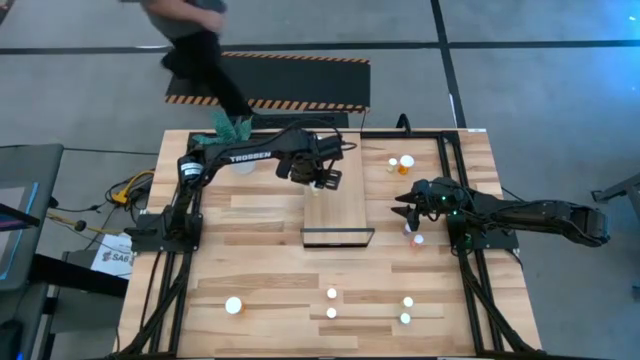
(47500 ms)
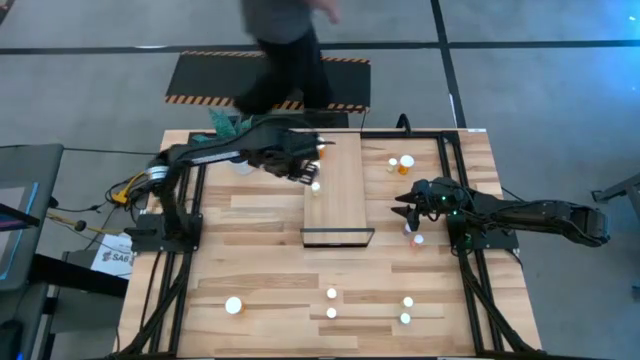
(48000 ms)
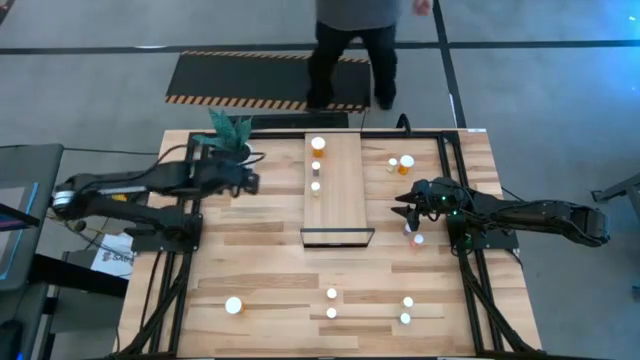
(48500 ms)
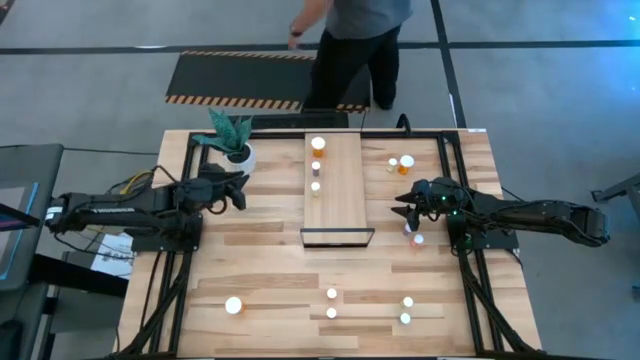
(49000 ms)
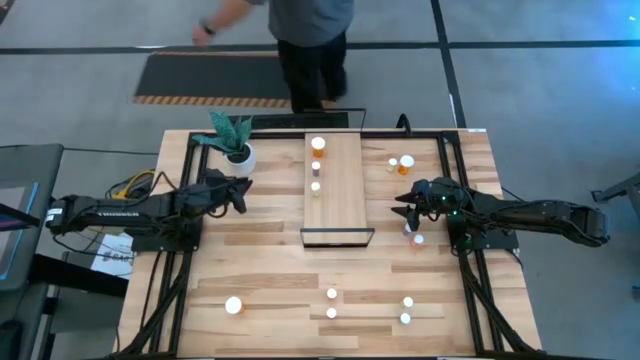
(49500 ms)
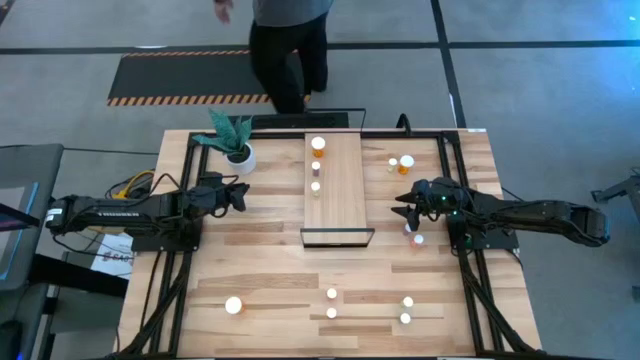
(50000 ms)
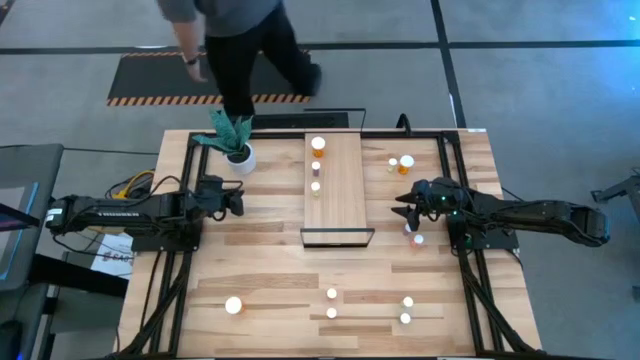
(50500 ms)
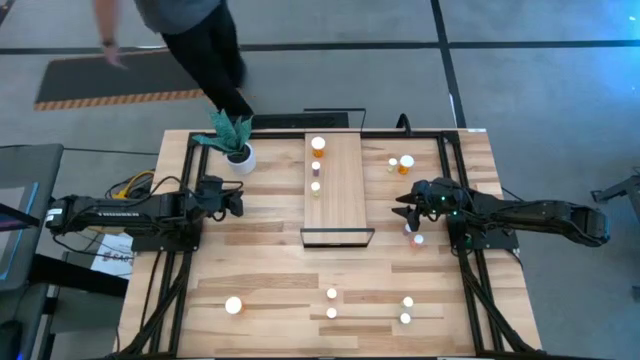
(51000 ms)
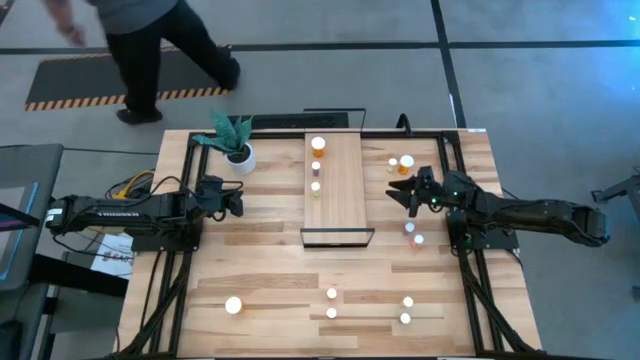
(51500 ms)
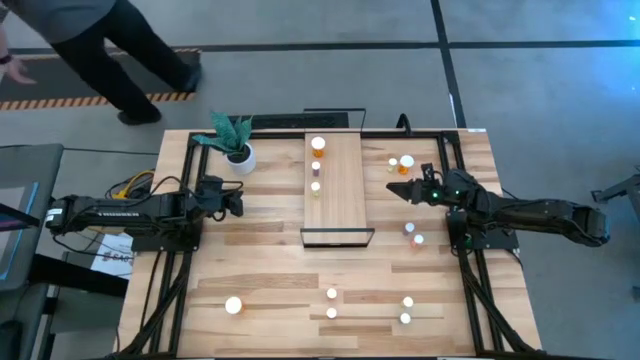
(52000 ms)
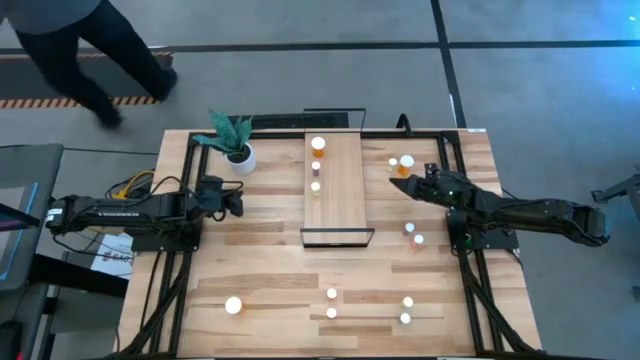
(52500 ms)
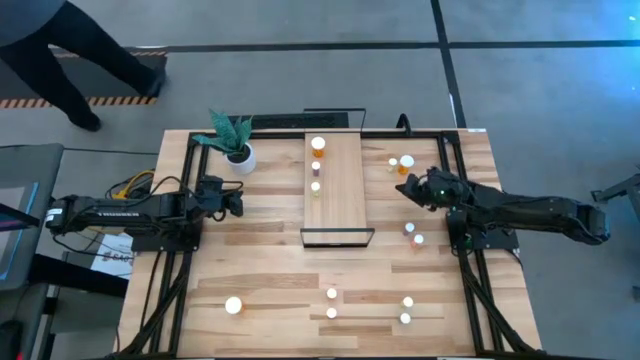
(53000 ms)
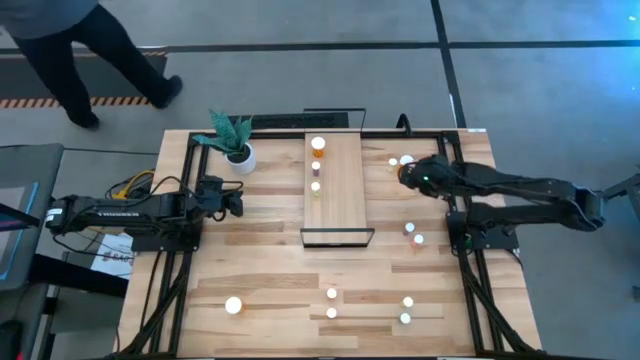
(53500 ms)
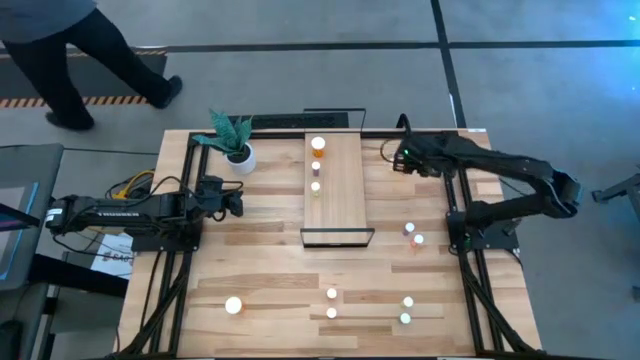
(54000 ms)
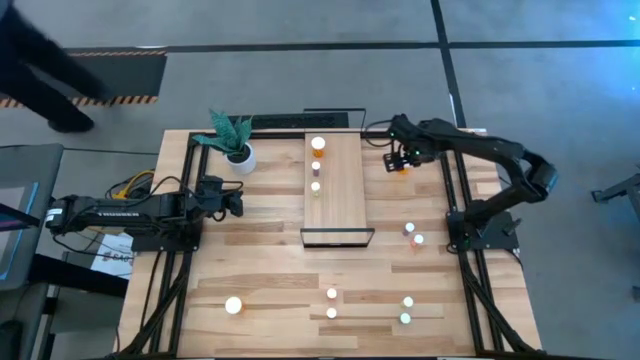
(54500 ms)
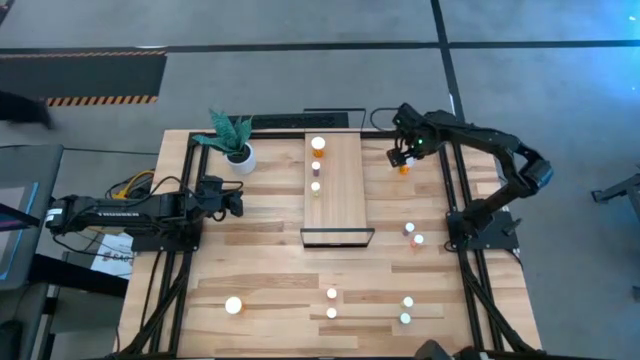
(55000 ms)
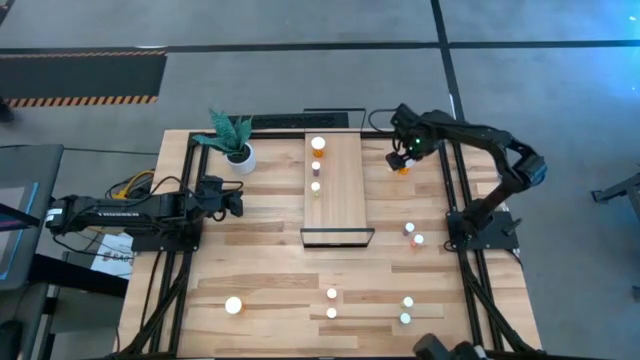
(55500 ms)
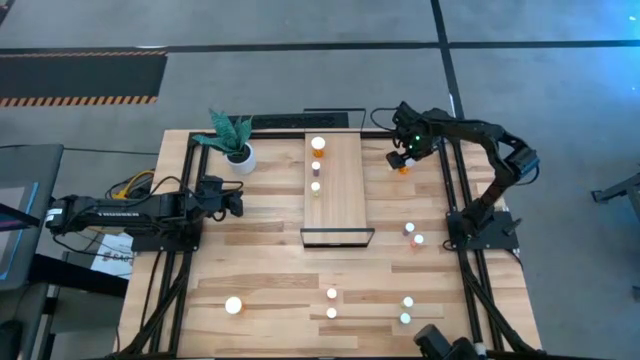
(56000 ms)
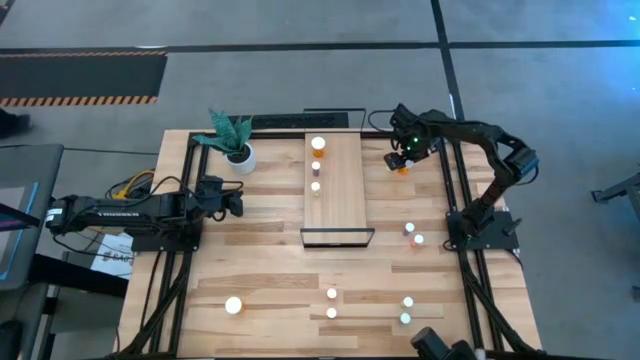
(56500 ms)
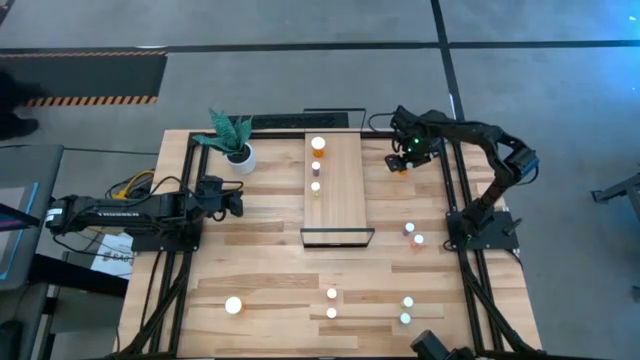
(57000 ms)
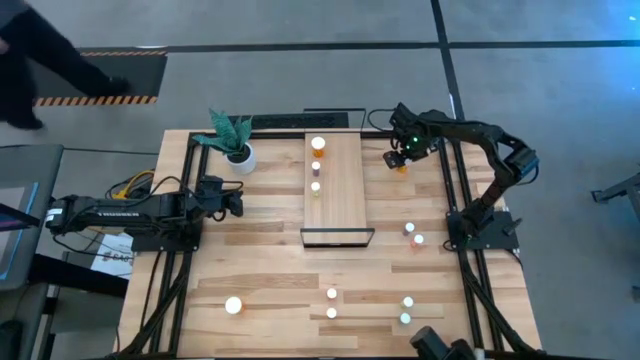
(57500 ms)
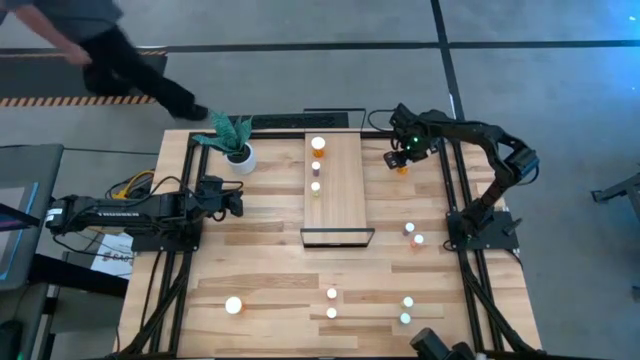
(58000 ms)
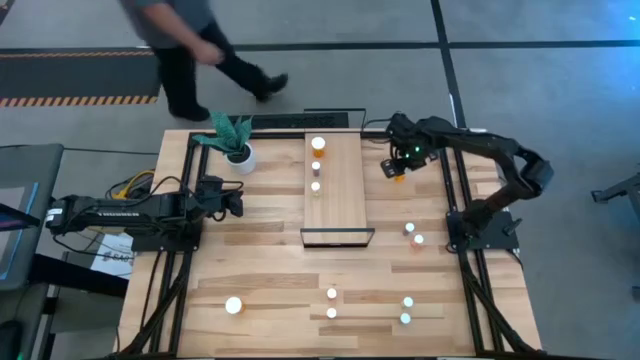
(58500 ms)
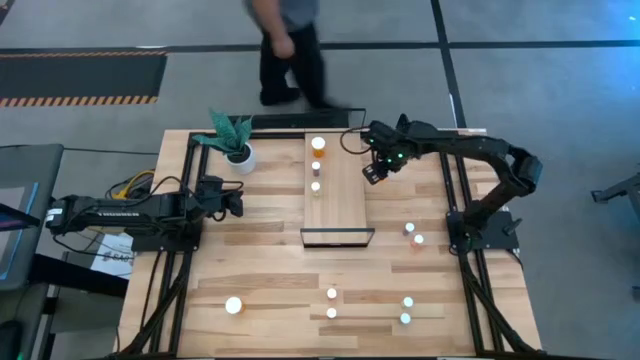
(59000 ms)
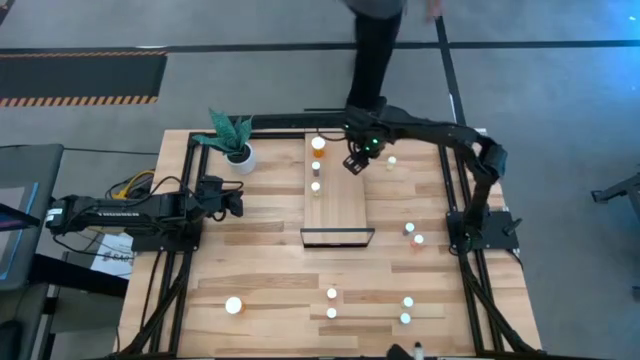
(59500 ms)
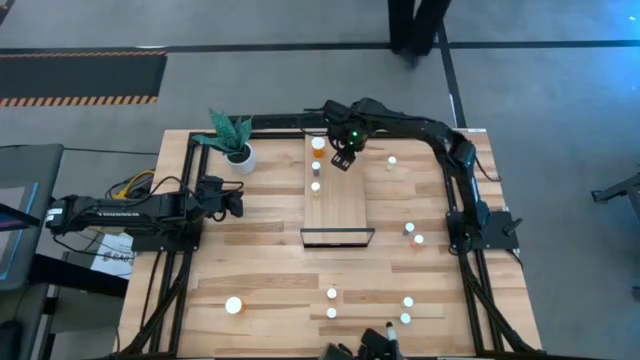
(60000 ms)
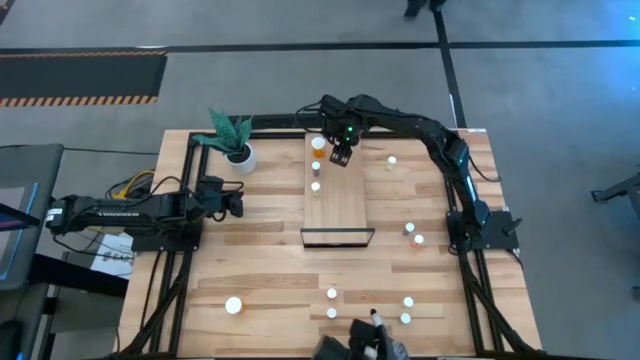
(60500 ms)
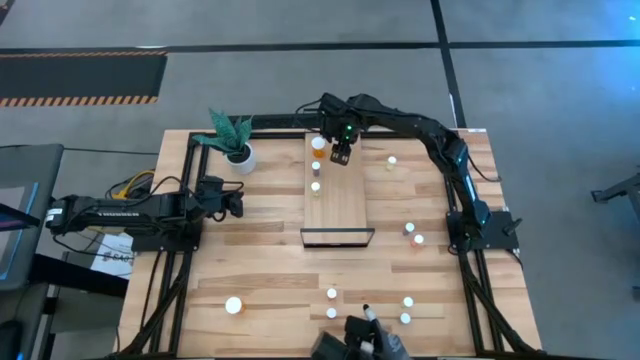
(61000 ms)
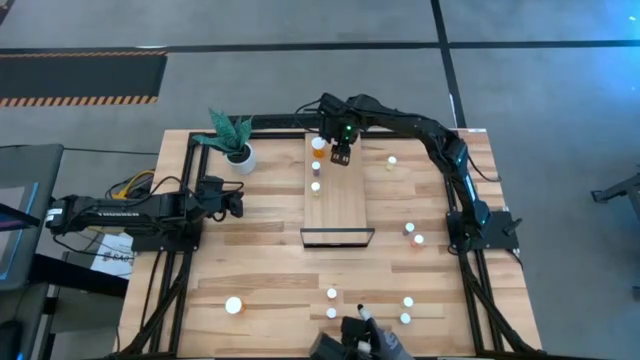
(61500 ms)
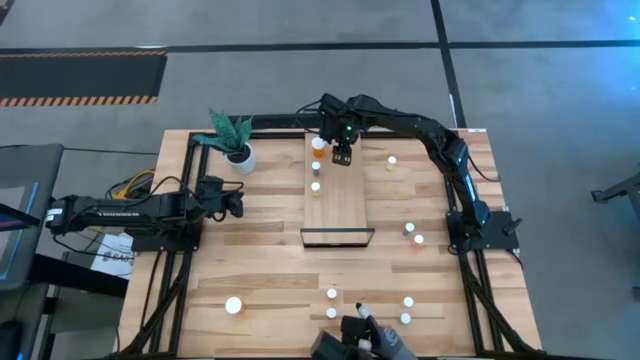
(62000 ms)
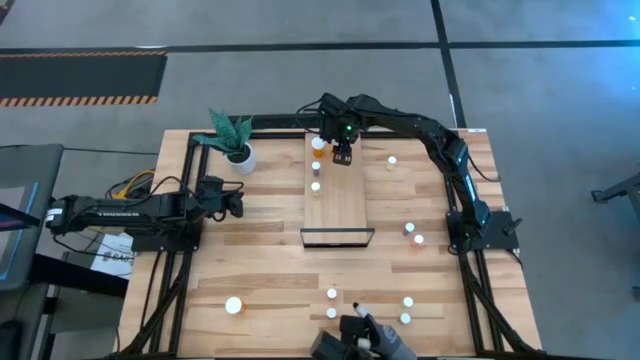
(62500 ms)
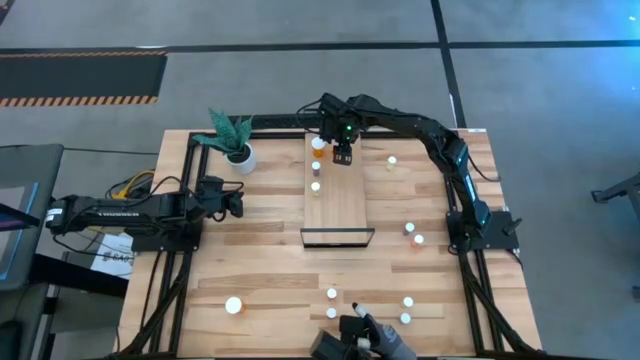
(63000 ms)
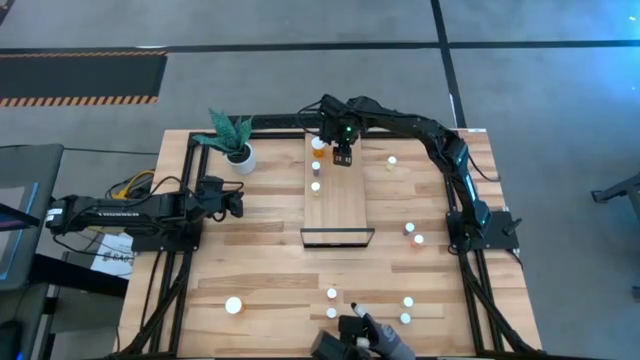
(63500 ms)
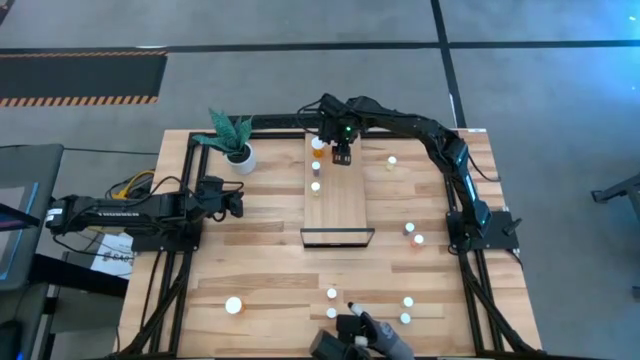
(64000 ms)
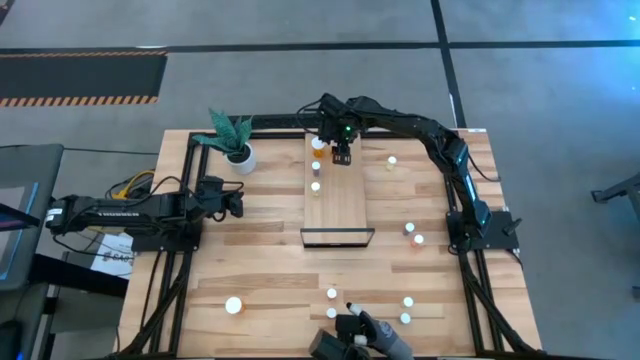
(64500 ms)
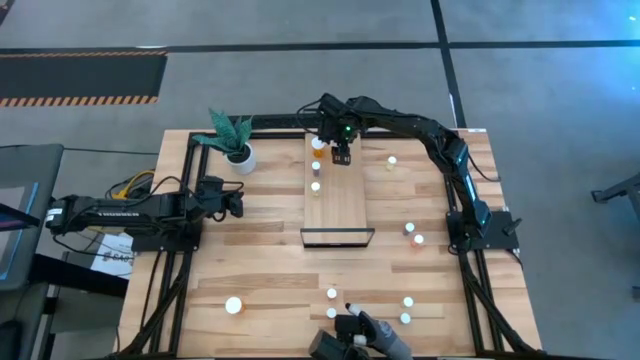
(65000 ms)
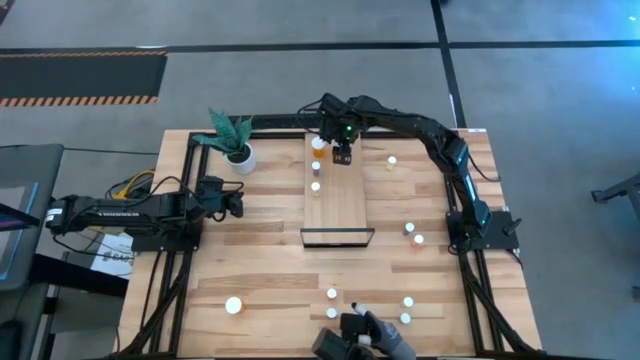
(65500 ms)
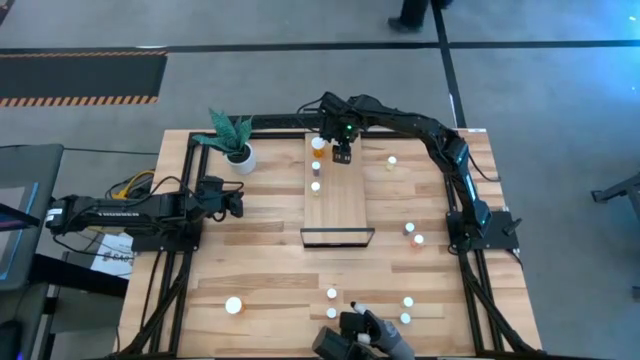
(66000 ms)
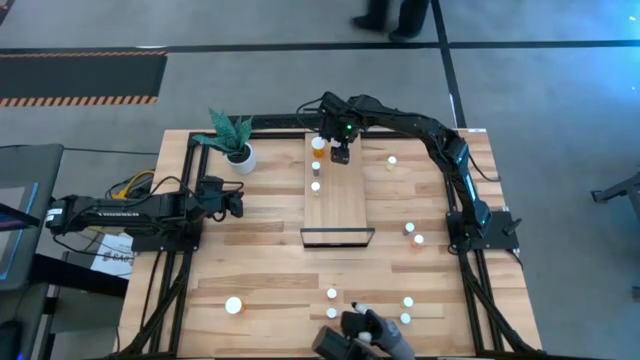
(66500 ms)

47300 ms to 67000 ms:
Task: Pick and place medicine bottles onto shelf by color
Put the top orange pill bottle on the shelf aligned with the other orange pill bottle

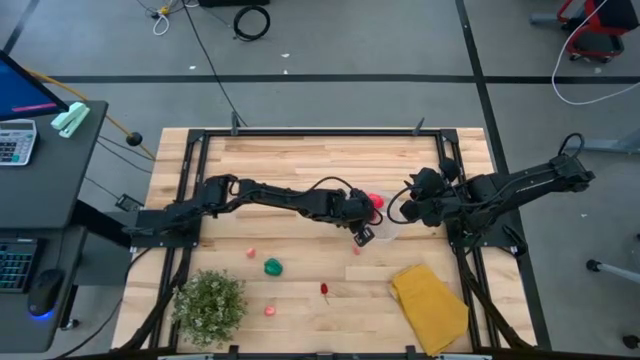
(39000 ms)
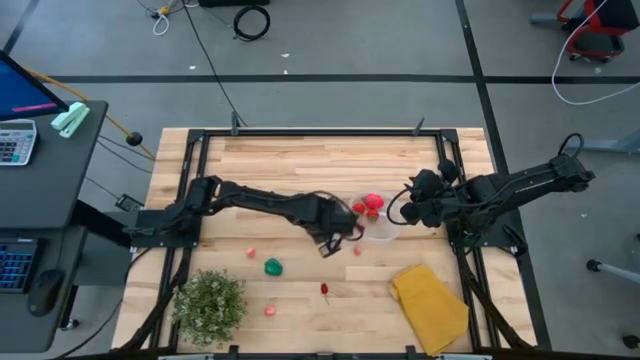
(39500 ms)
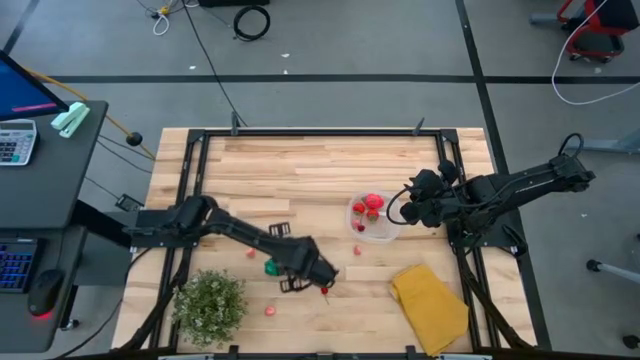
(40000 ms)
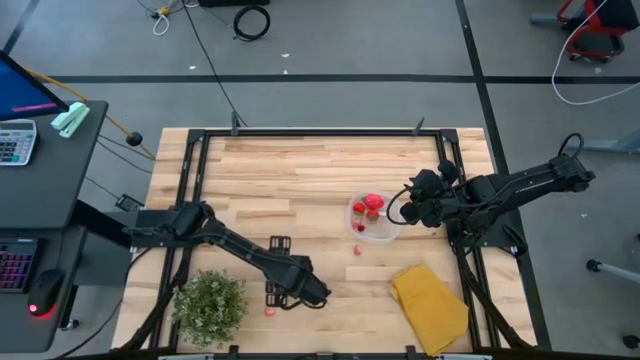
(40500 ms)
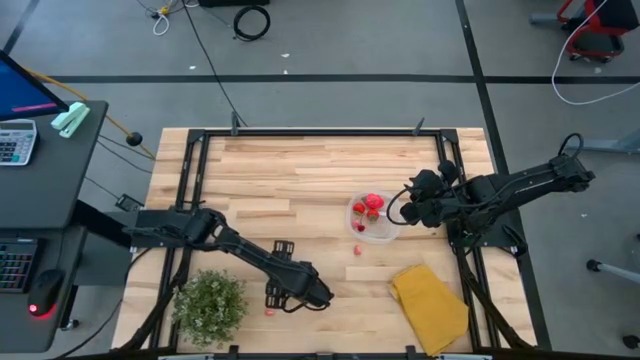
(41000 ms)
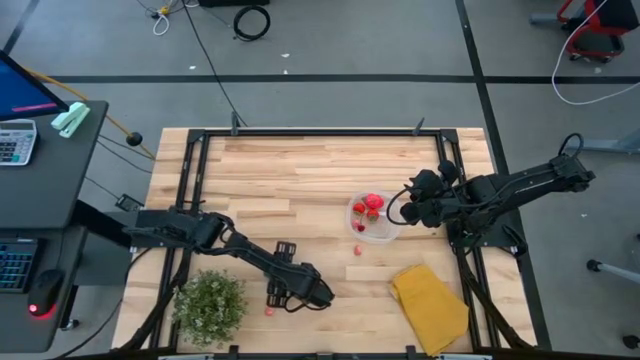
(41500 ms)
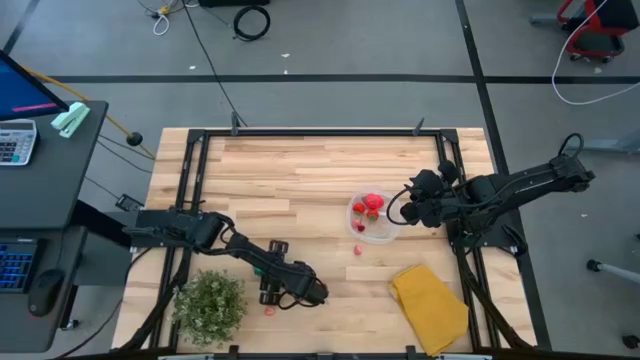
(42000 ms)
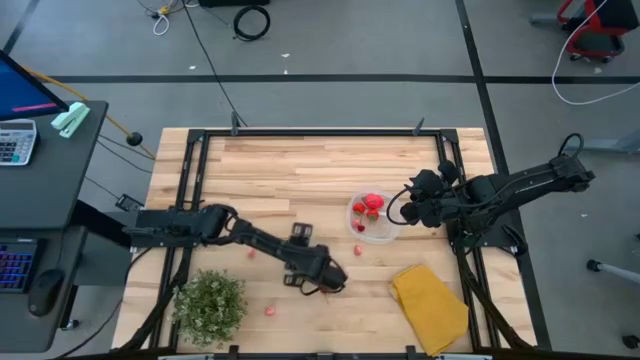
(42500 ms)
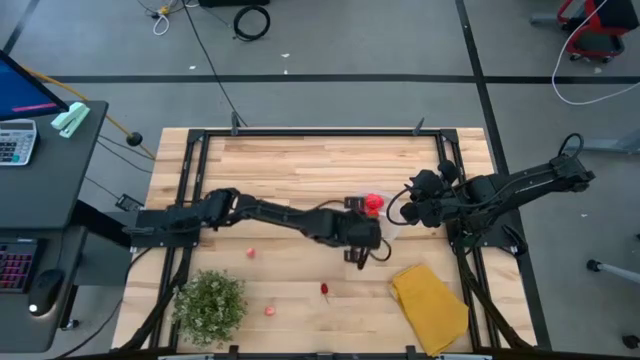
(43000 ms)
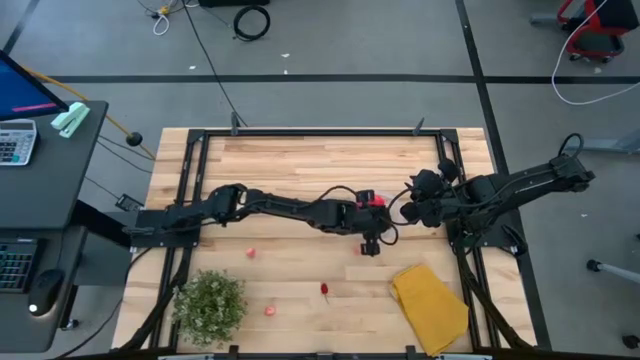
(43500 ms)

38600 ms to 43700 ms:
Task: Pick and placing Produce into tupperware
Put the green bell pepper into the transparent container
